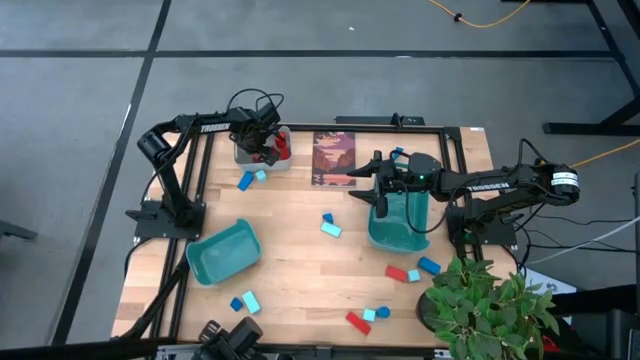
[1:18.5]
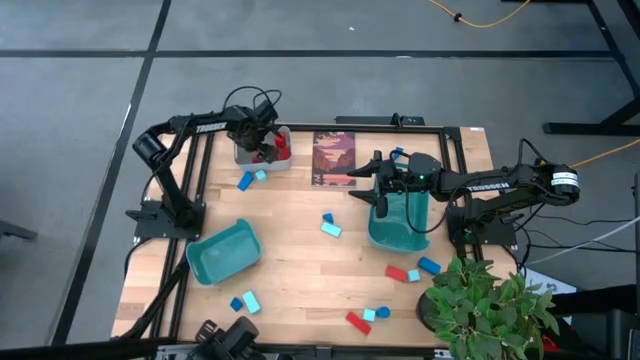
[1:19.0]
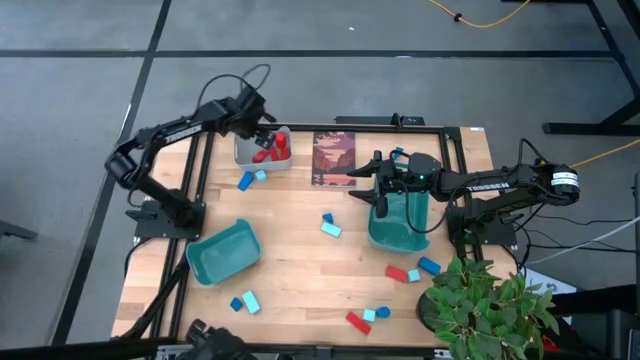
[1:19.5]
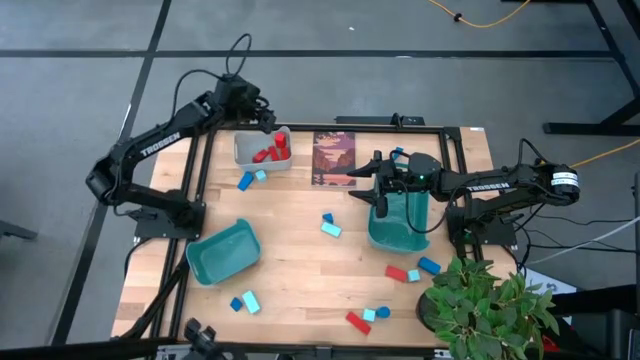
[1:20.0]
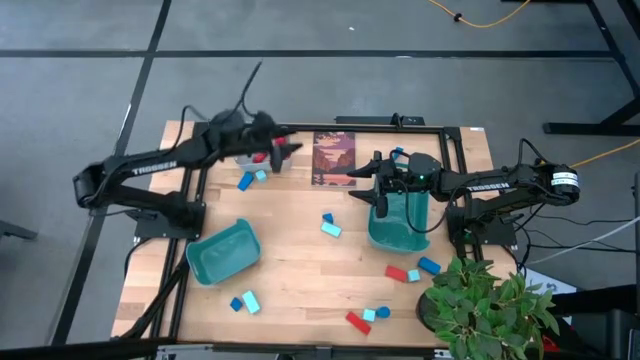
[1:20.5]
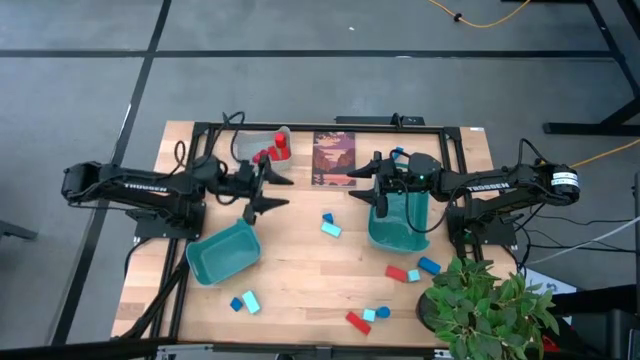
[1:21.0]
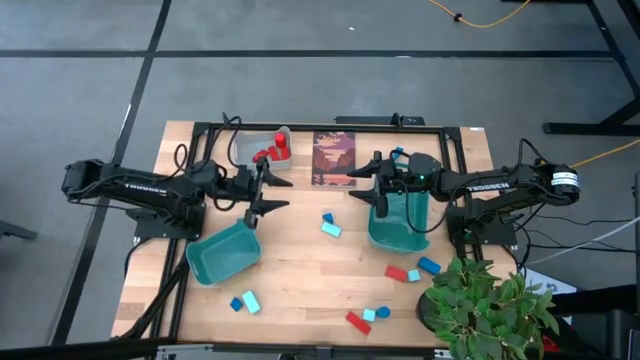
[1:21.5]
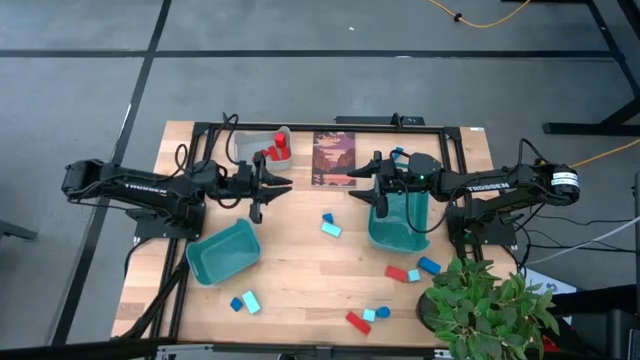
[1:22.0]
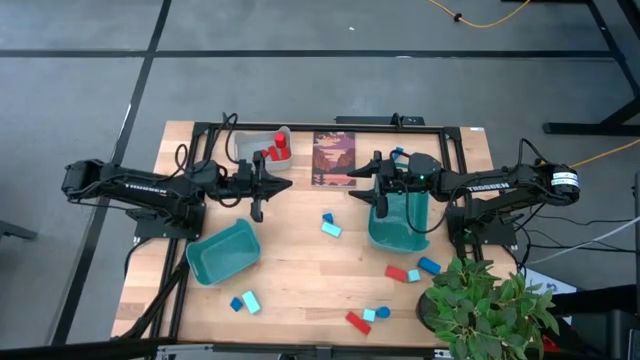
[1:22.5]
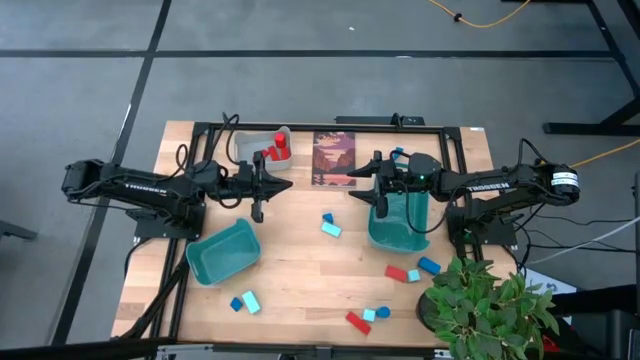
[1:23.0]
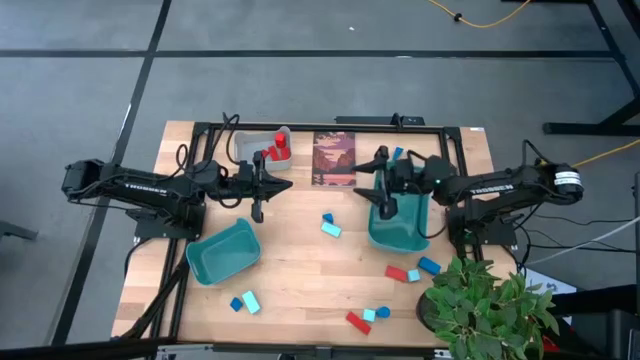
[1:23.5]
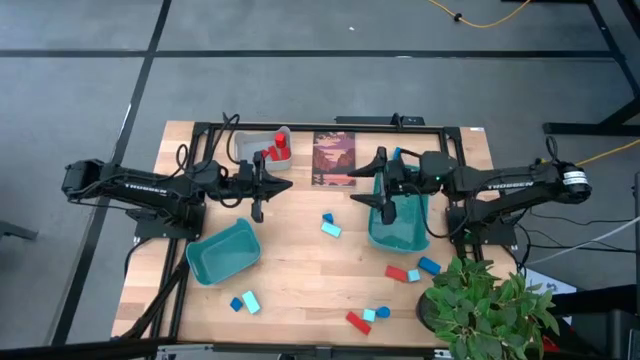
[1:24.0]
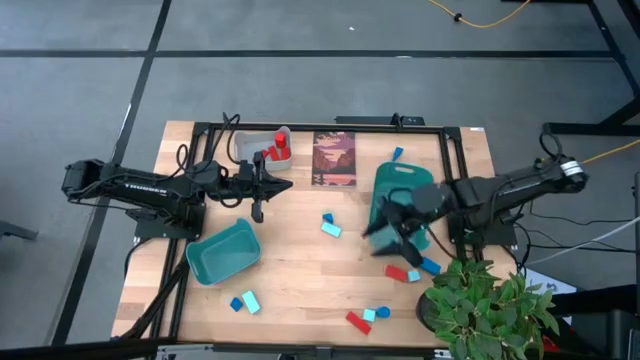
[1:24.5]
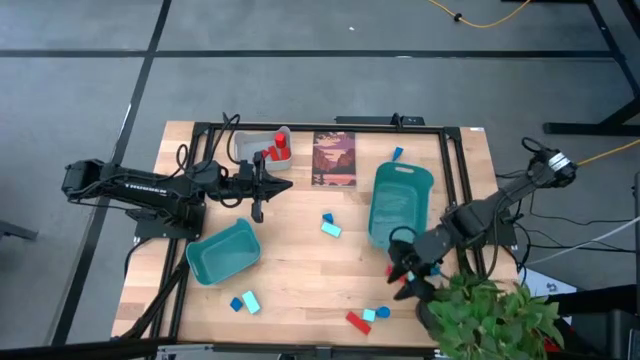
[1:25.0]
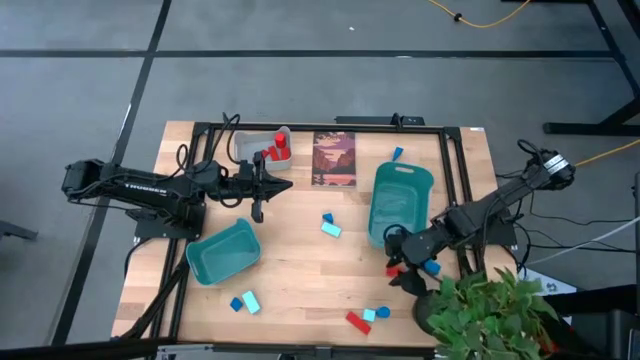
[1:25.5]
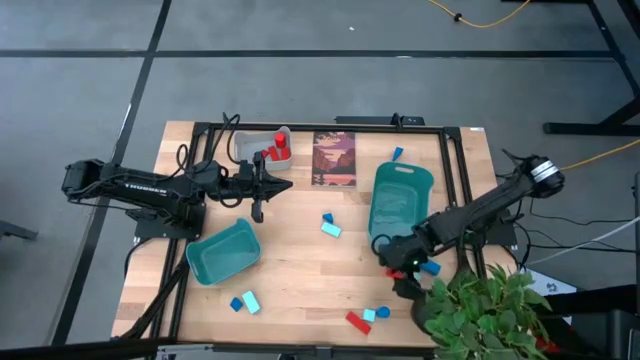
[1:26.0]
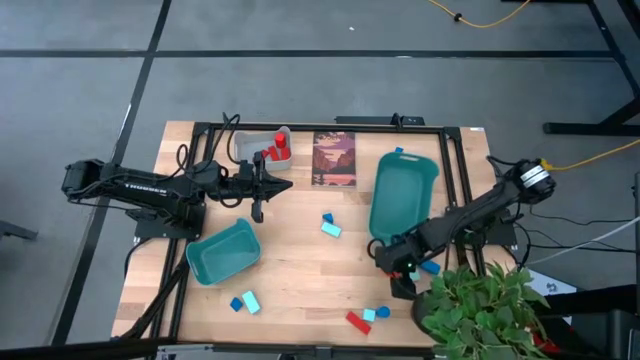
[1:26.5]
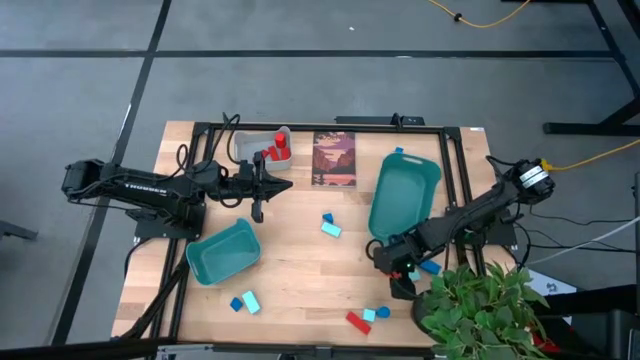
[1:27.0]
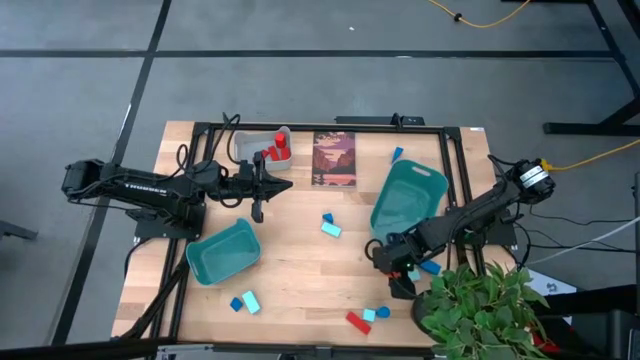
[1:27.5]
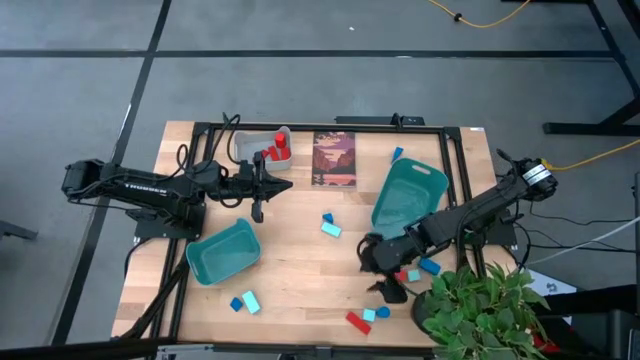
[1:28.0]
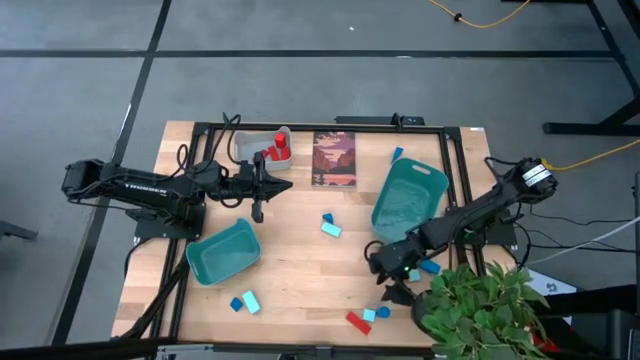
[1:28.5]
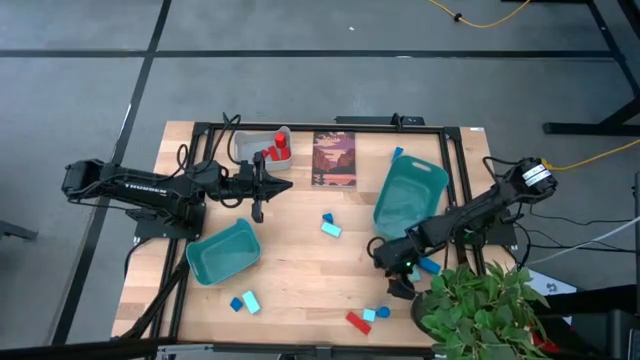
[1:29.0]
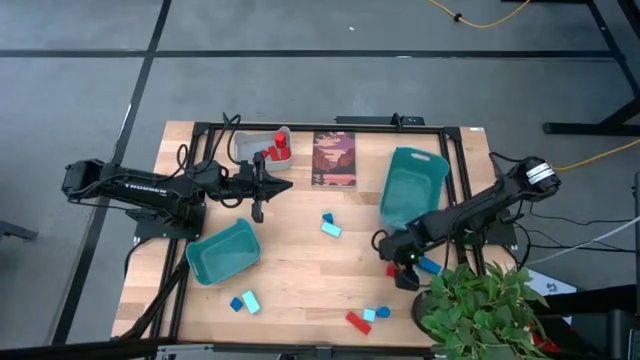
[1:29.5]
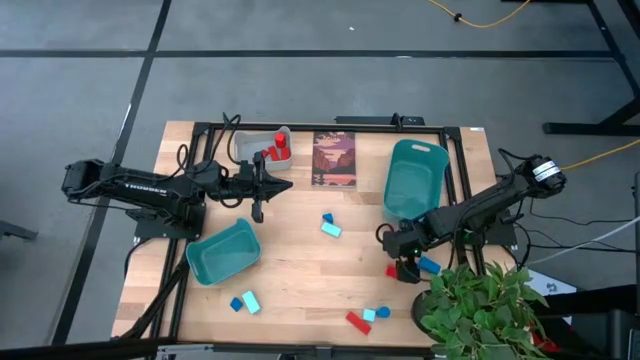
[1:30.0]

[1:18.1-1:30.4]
Task: Sort & place blocks by color
Put the red block into the gray bin

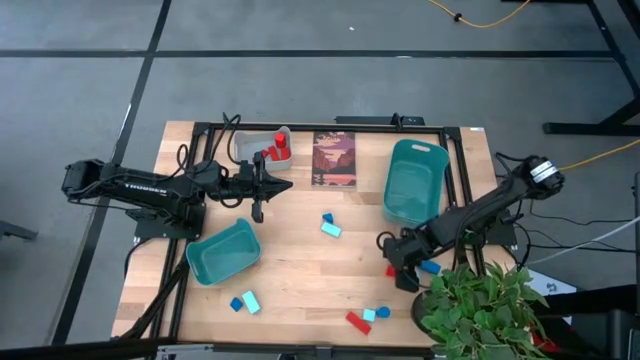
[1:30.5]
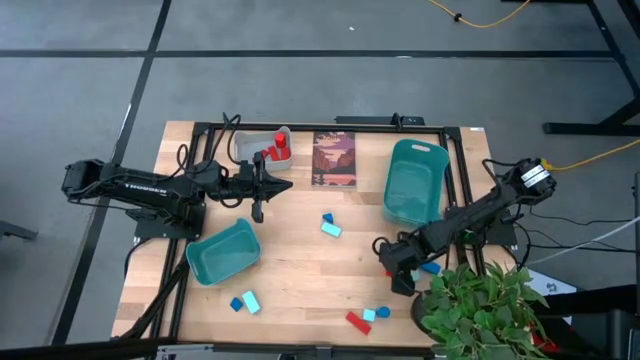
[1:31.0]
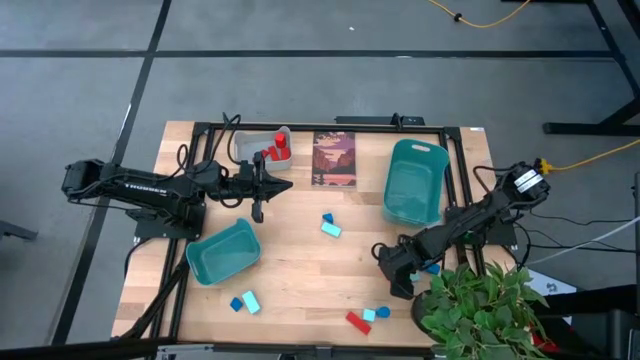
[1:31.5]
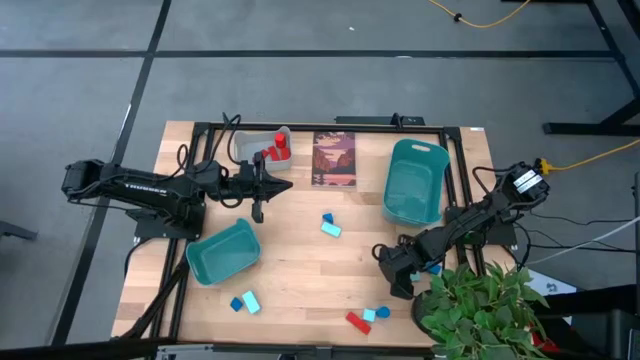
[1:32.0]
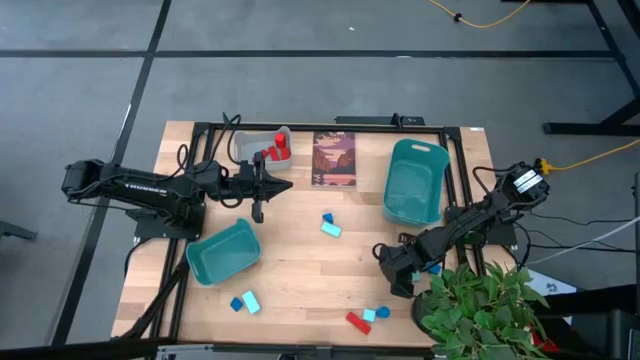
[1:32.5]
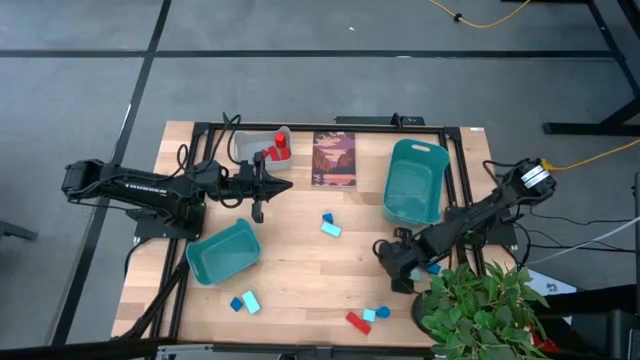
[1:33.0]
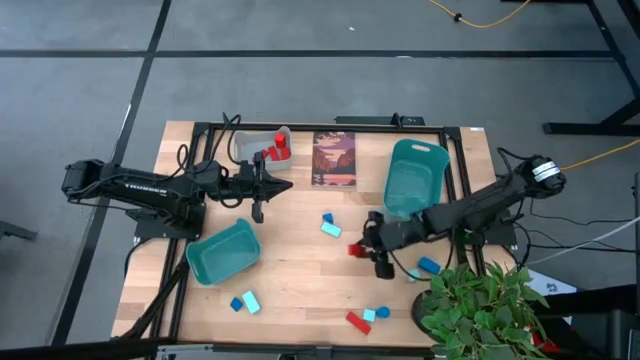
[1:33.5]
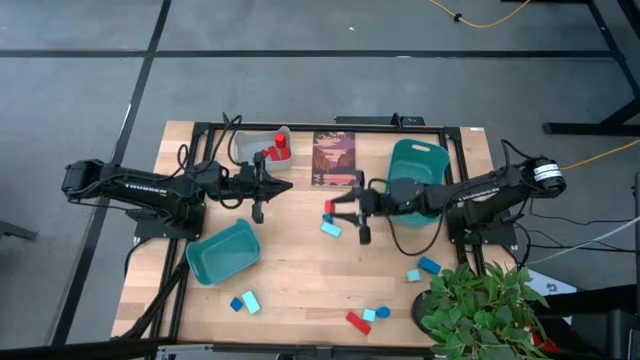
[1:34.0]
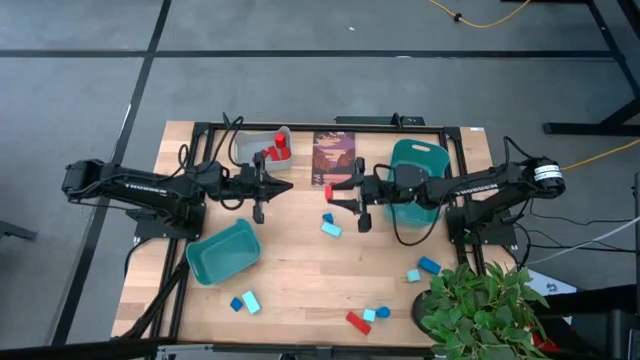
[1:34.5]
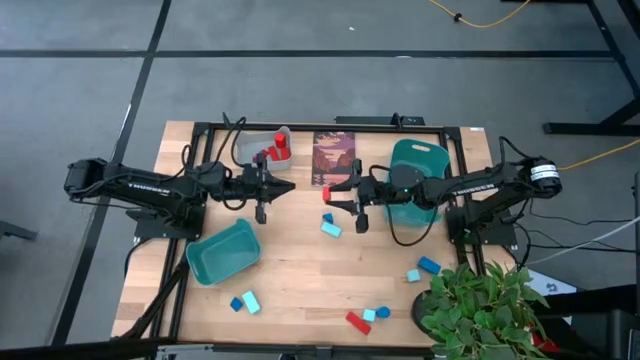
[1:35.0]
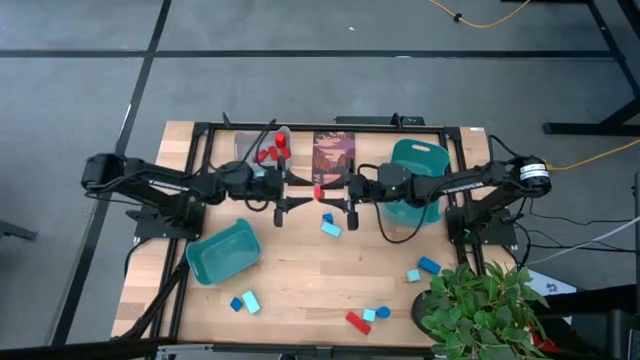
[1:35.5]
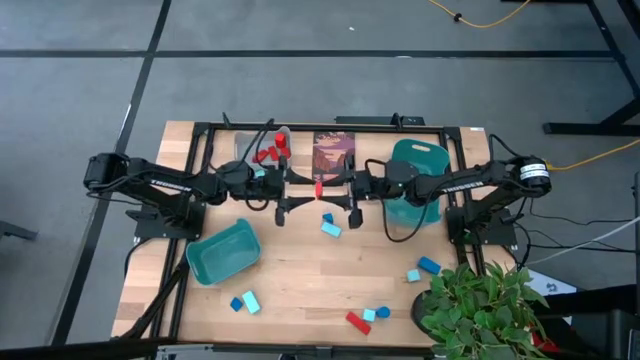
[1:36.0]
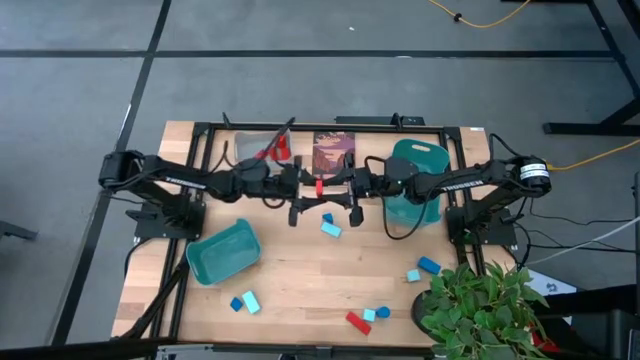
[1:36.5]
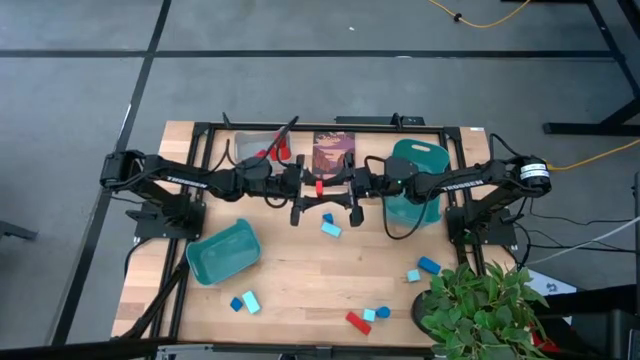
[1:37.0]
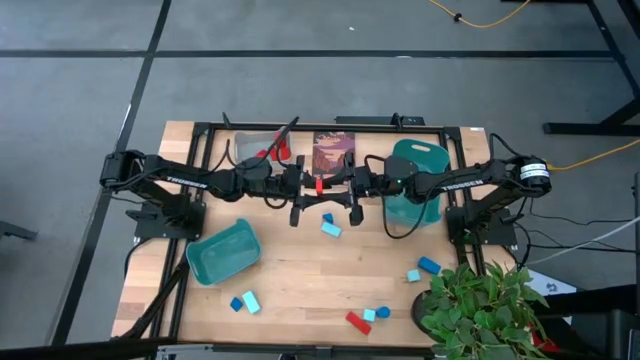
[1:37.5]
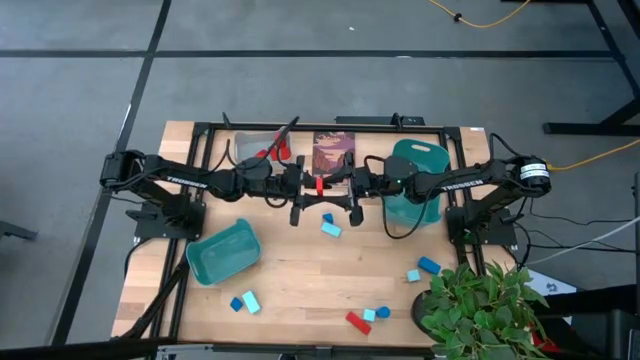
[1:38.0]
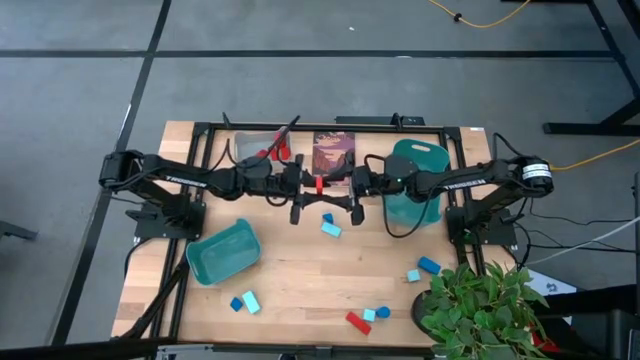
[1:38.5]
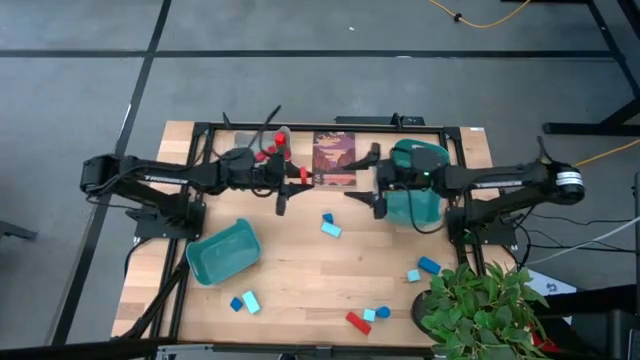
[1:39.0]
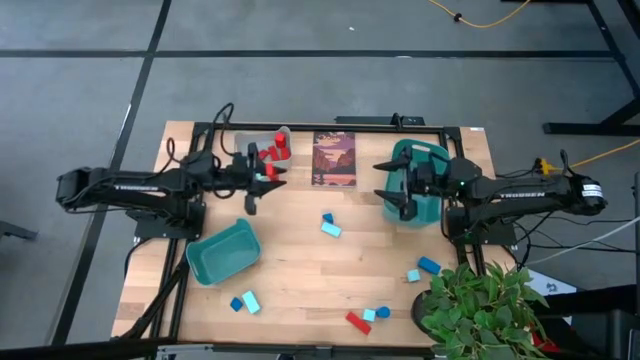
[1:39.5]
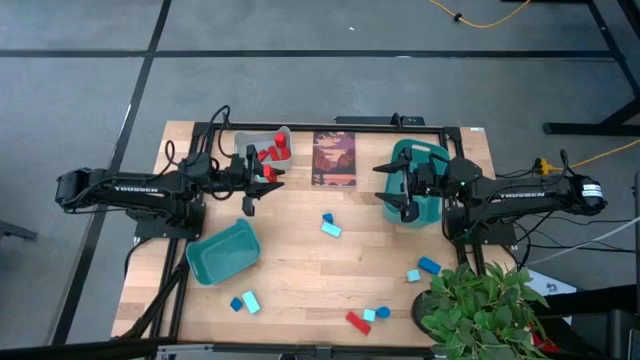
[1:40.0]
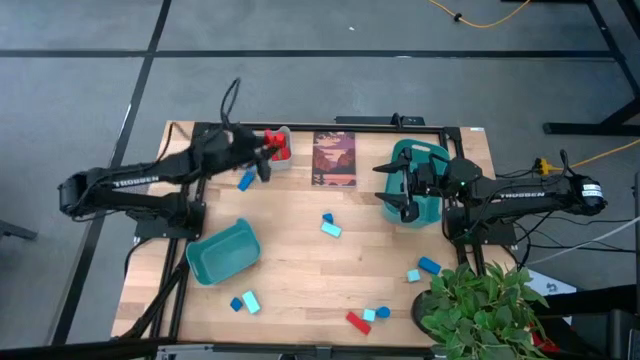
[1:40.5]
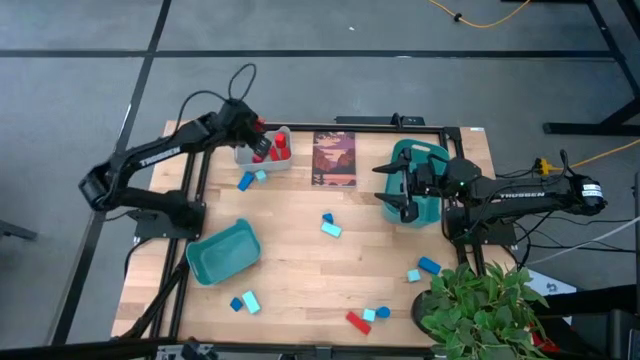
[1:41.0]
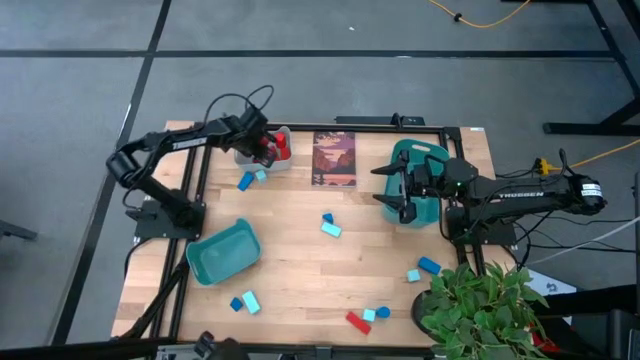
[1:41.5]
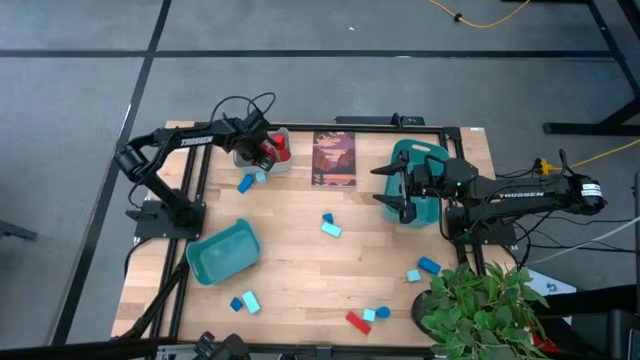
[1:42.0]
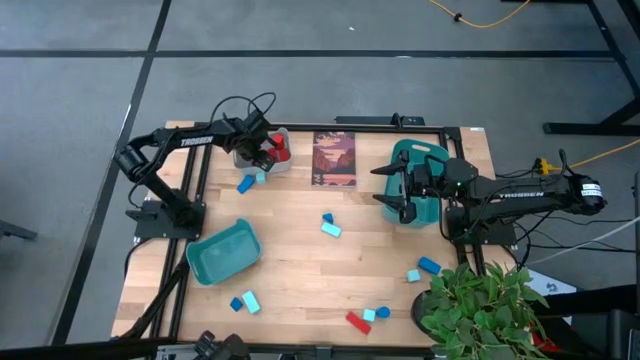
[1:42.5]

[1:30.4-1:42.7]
Put the red block into the gray bin
